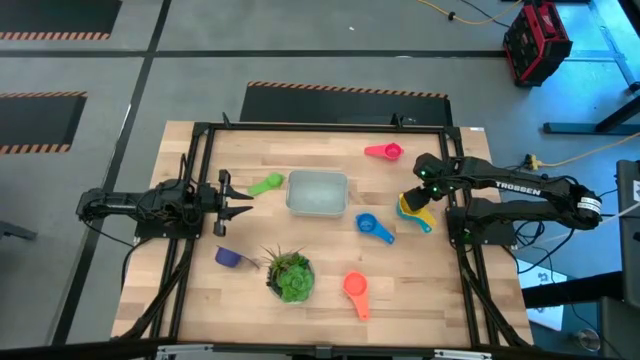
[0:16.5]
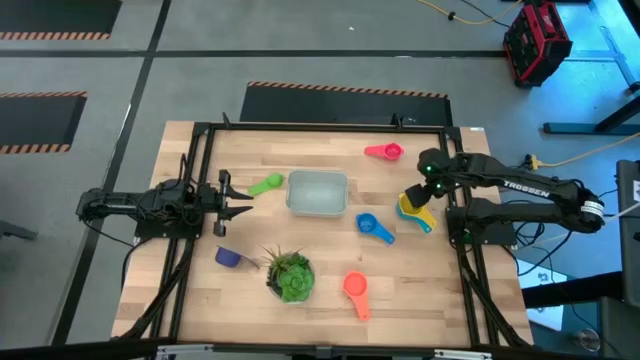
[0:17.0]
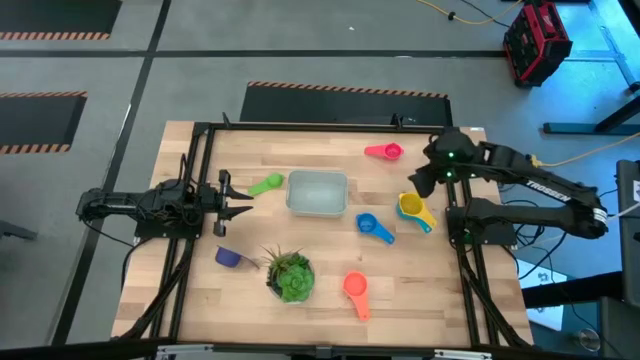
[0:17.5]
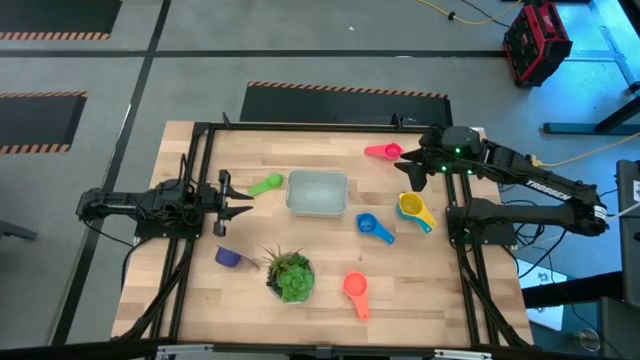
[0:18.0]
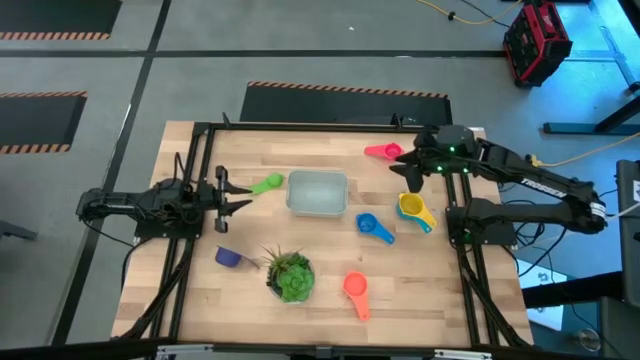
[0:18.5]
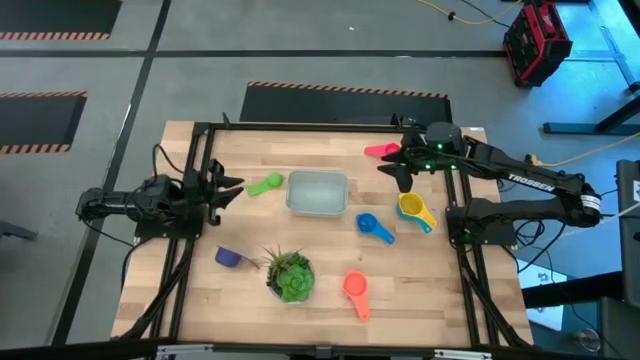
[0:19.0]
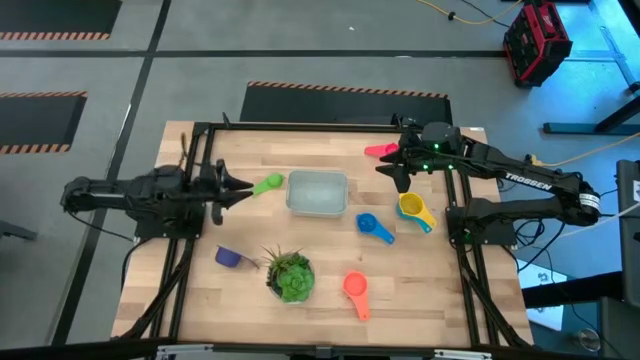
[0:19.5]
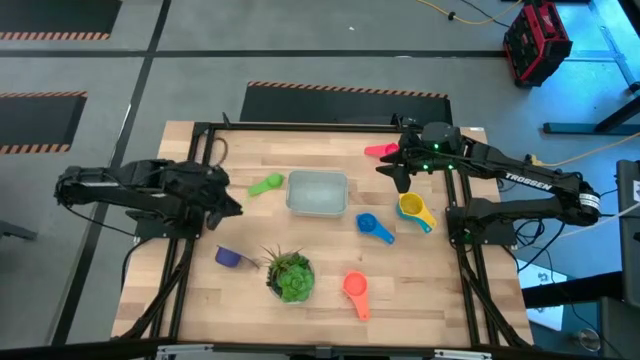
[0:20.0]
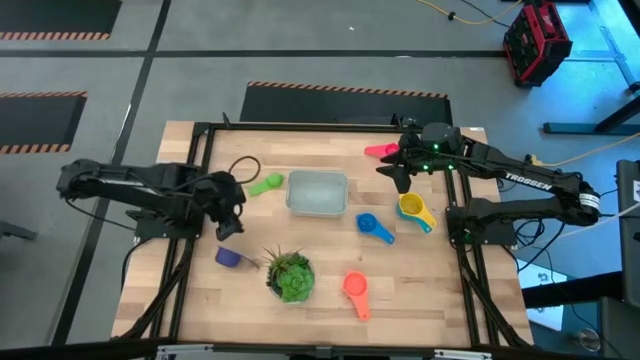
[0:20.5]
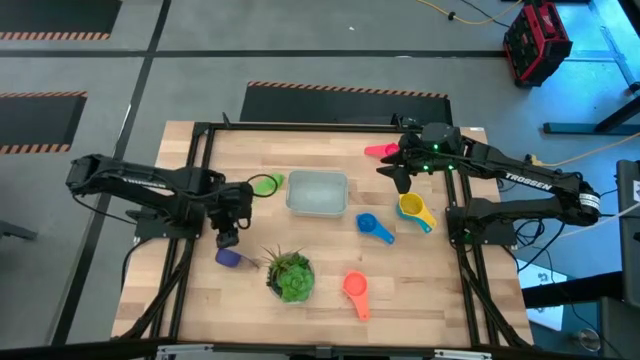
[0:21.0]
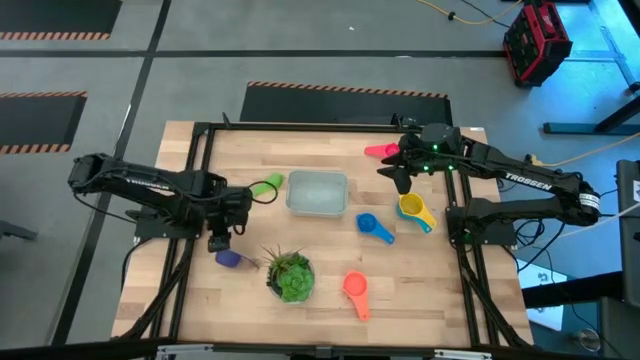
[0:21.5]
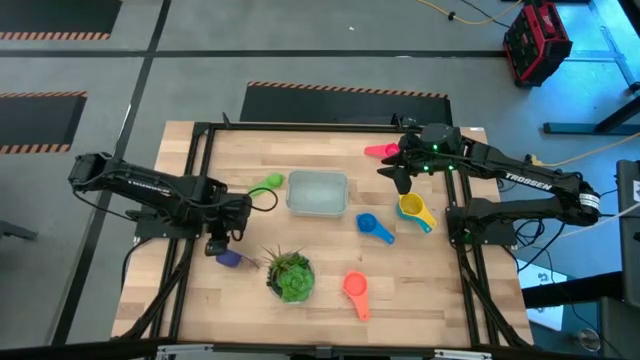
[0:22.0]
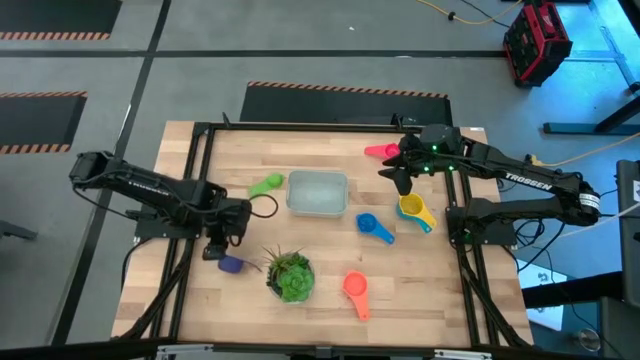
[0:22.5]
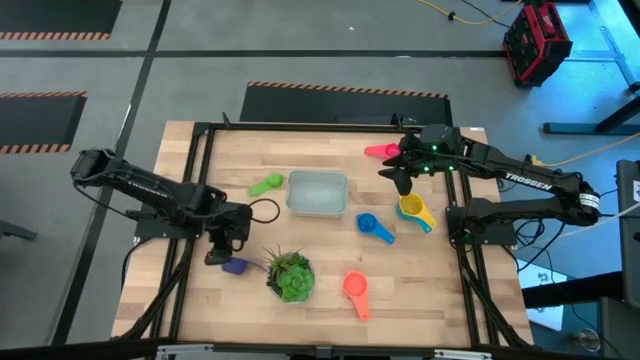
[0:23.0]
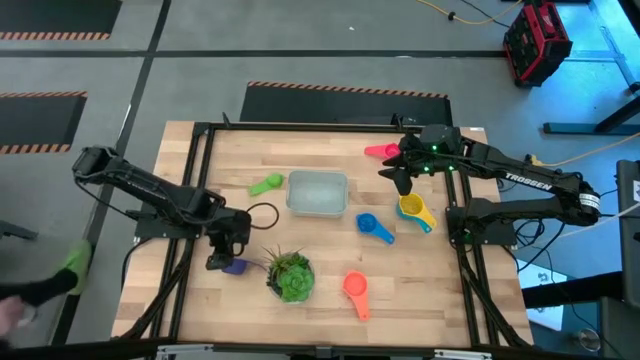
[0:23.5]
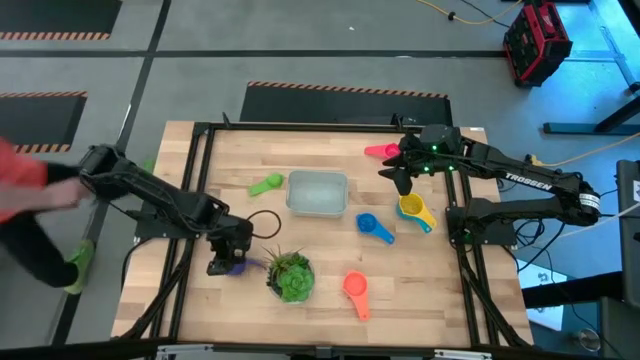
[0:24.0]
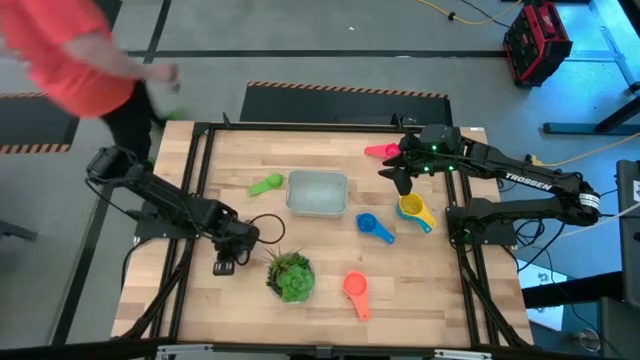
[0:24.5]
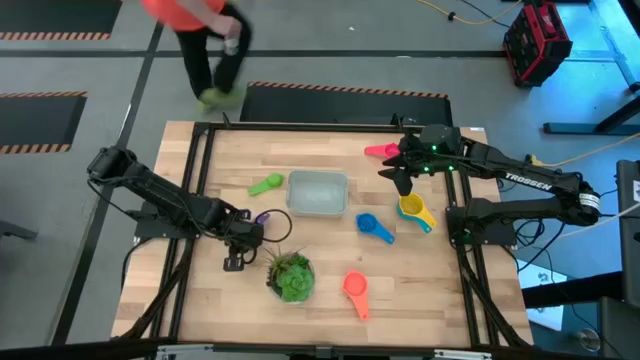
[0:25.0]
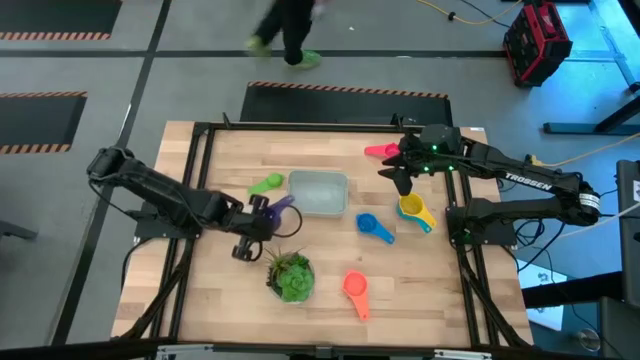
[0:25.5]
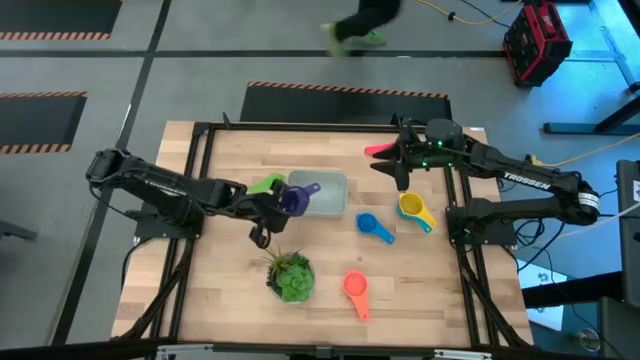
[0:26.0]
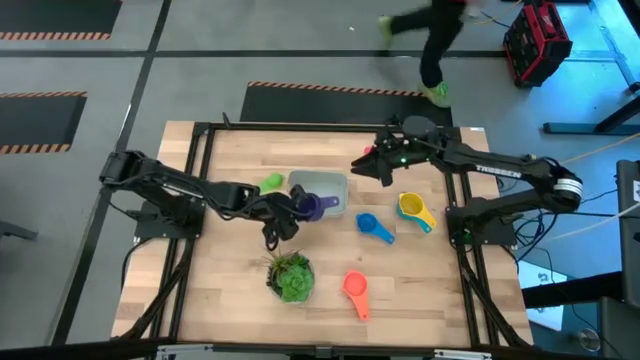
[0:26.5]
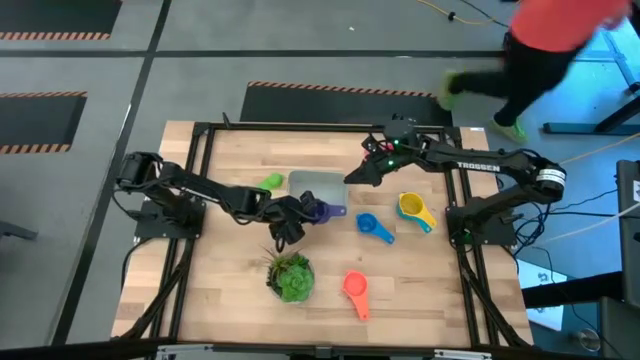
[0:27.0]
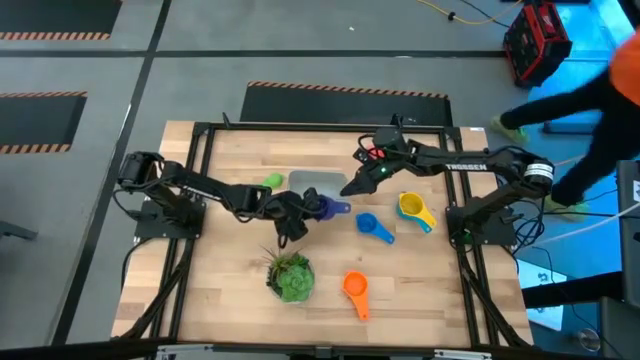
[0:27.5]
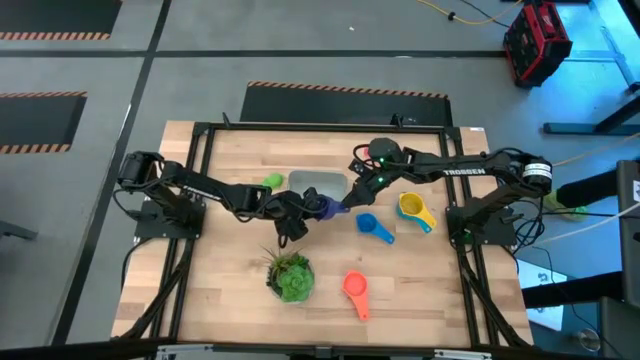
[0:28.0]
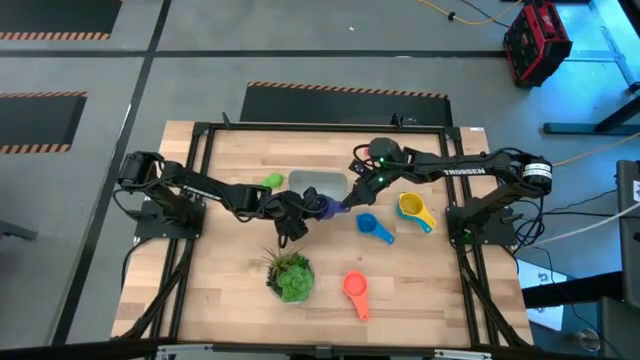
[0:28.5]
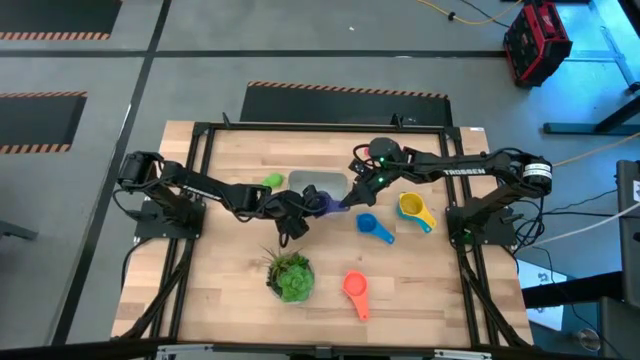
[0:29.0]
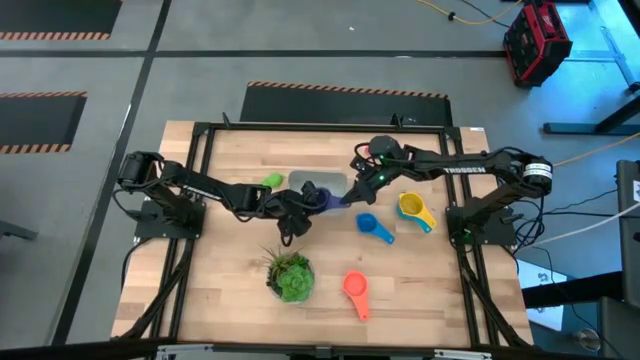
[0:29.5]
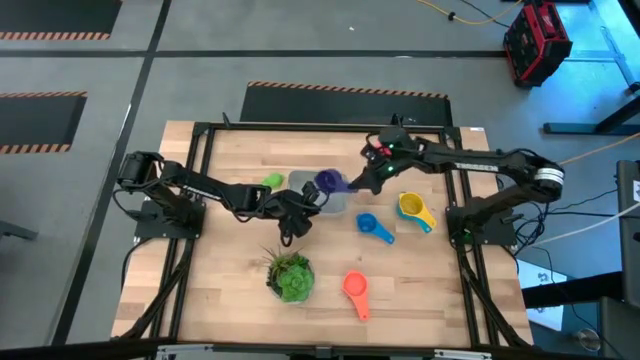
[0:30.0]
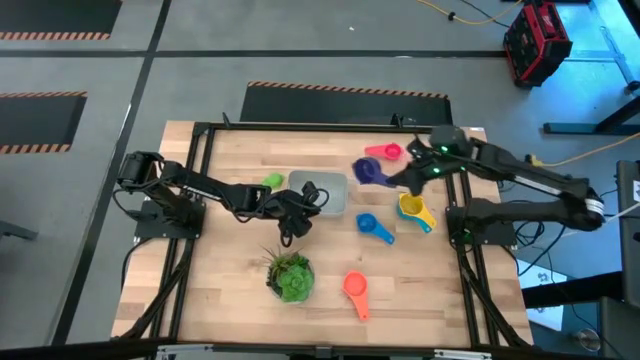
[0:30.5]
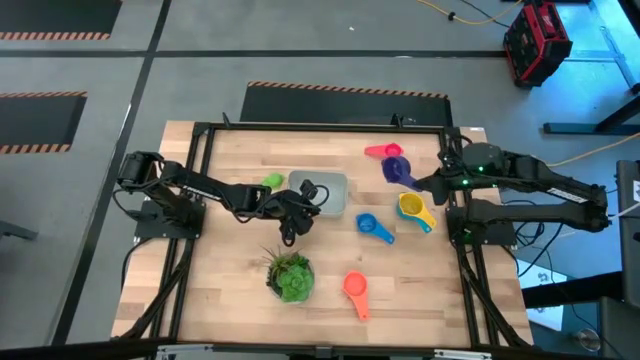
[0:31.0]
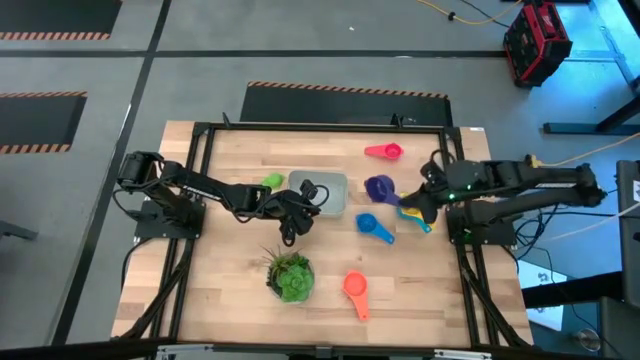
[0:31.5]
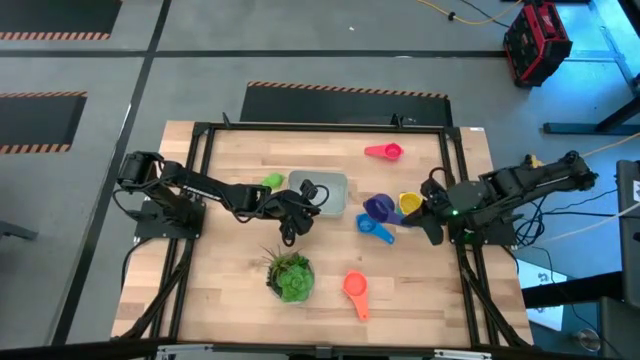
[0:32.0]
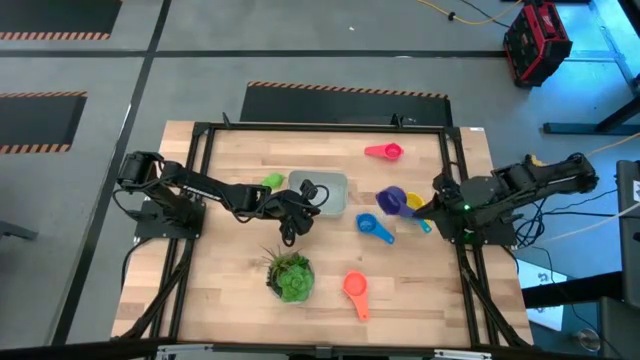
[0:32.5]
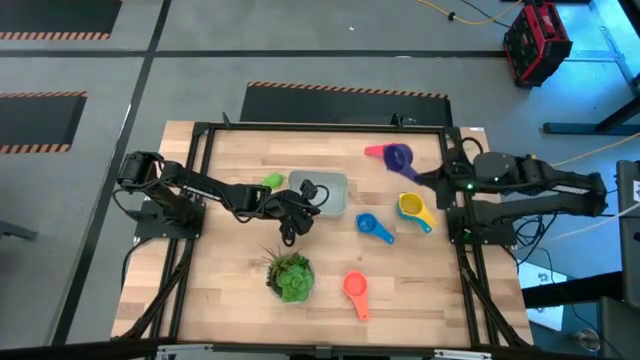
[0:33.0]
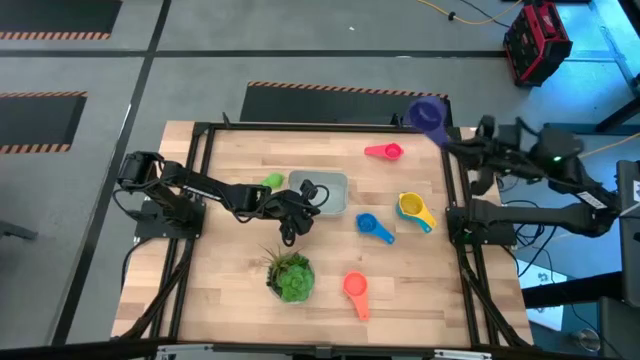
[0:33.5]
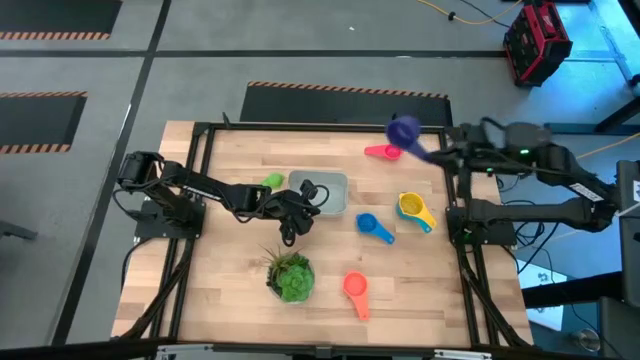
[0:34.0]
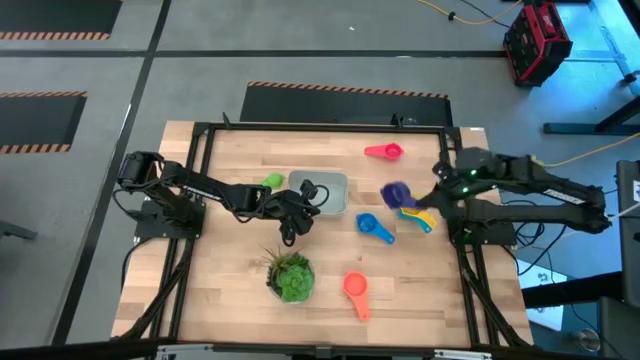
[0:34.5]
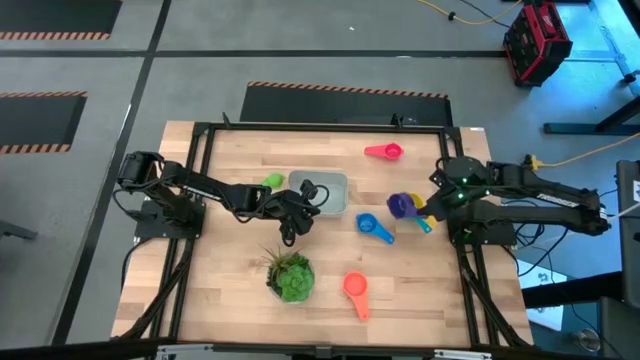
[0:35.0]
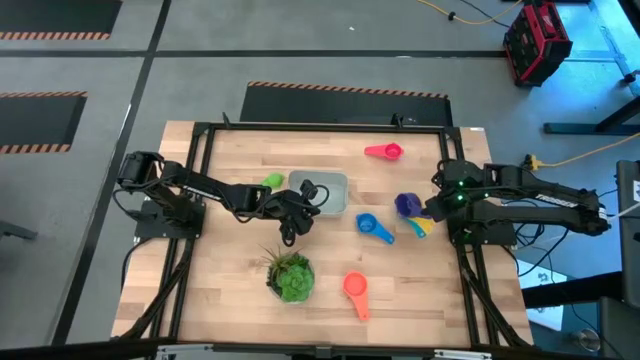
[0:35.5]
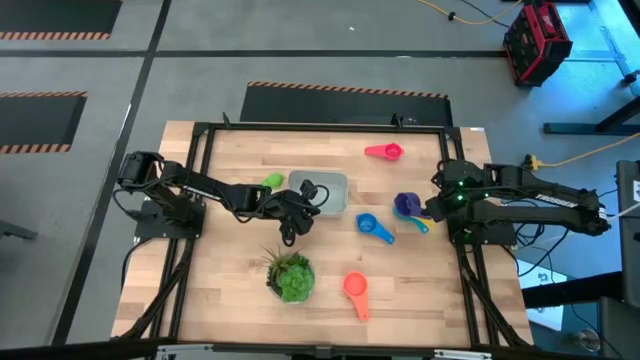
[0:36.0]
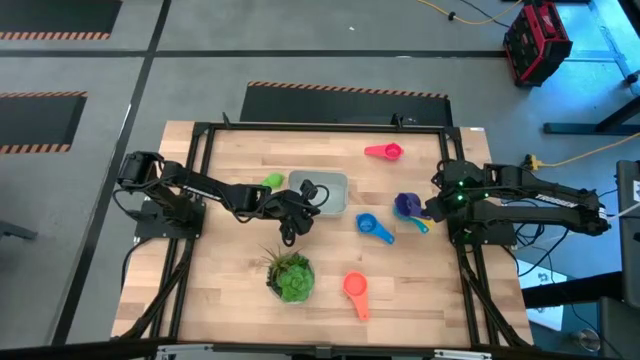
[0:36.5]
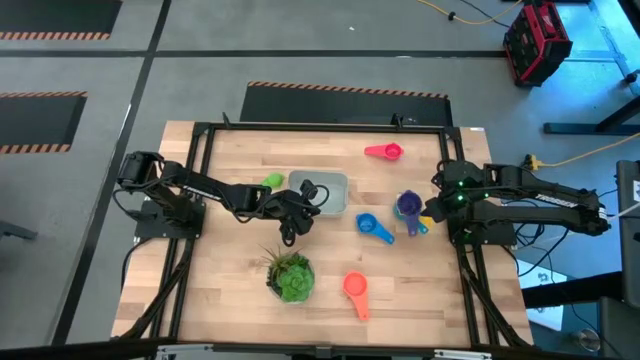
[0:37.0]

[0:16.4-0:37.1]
Task: Nest measuring cups in basket
Stack the violet measuring cup on top of the the yellow measuring cup
